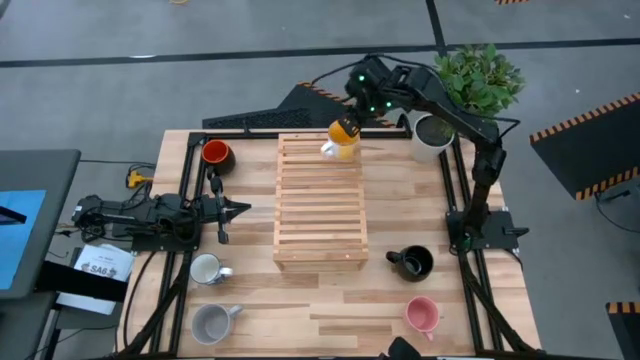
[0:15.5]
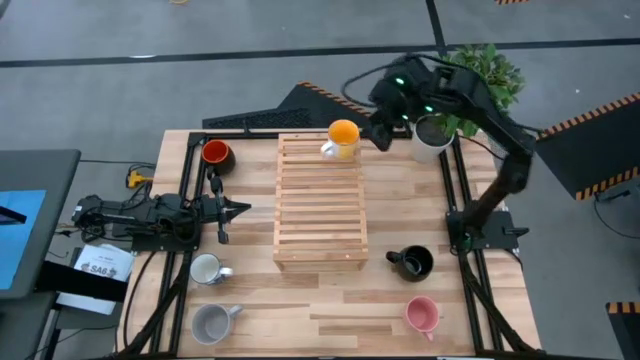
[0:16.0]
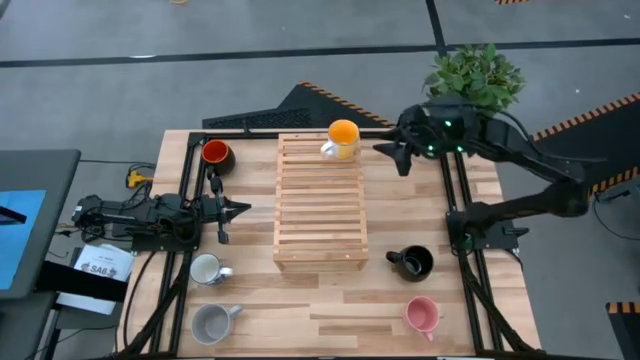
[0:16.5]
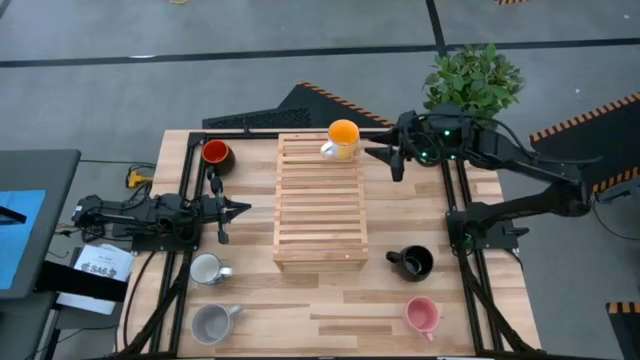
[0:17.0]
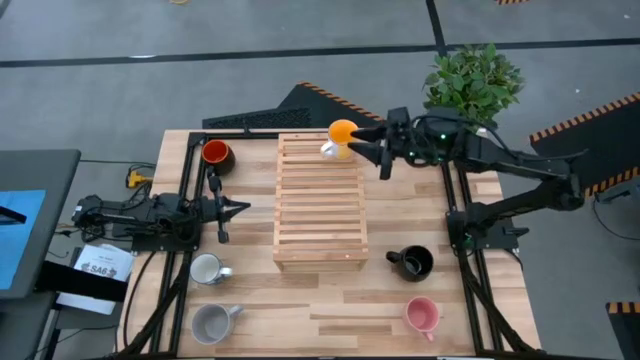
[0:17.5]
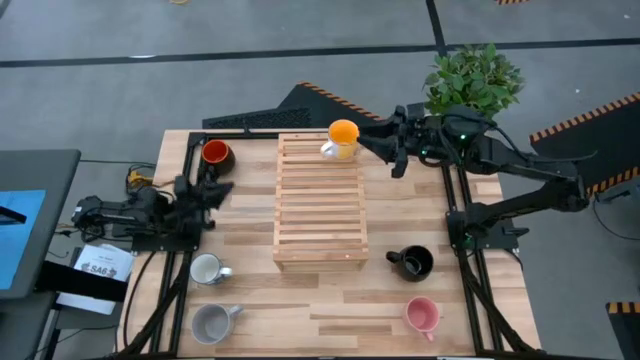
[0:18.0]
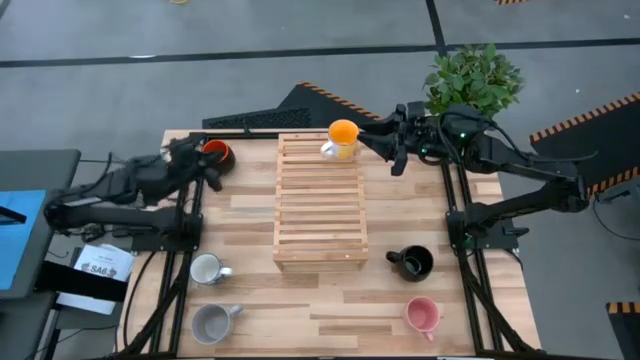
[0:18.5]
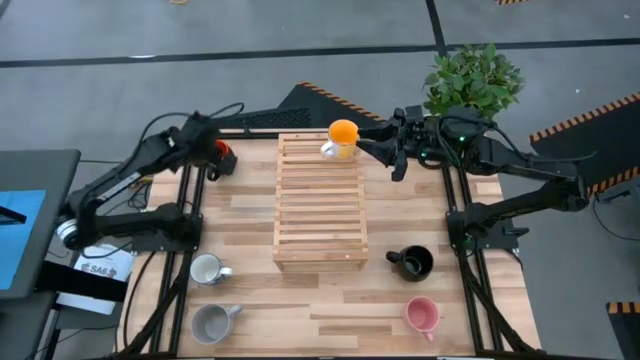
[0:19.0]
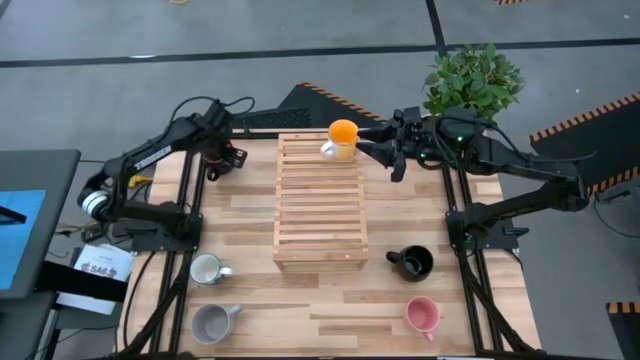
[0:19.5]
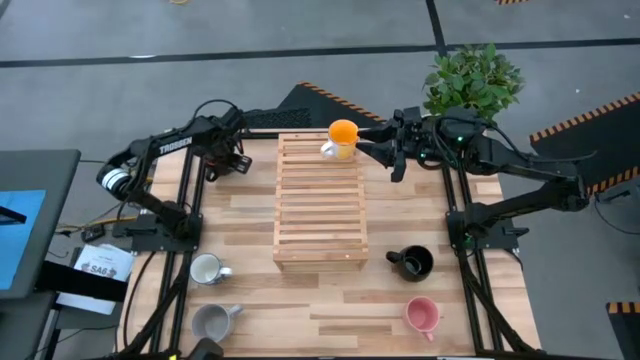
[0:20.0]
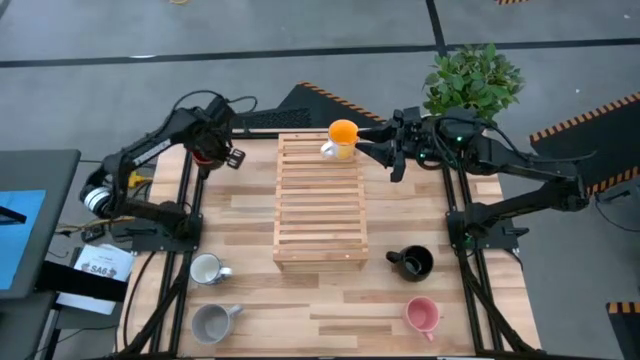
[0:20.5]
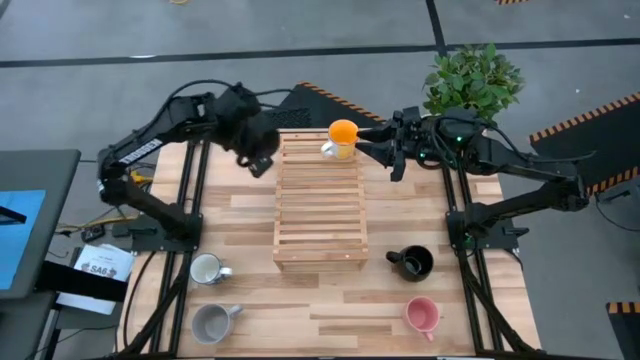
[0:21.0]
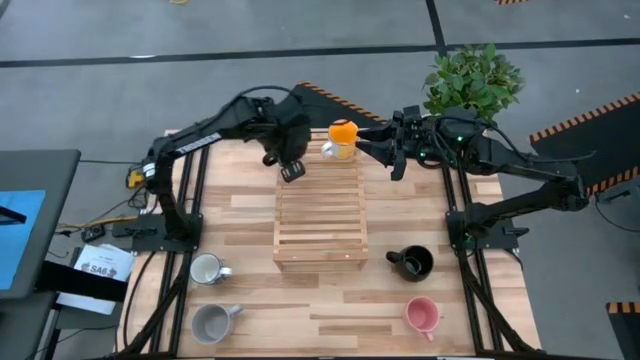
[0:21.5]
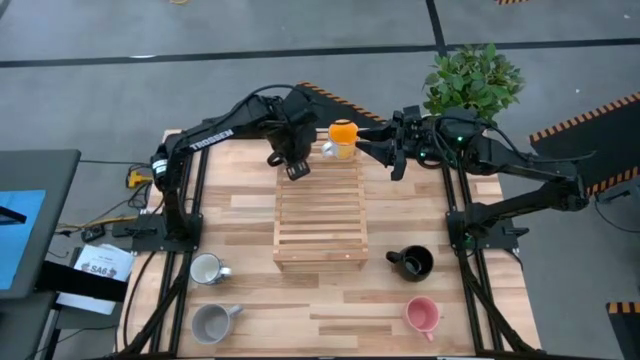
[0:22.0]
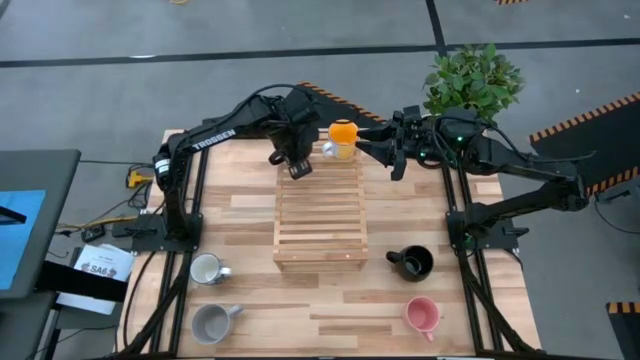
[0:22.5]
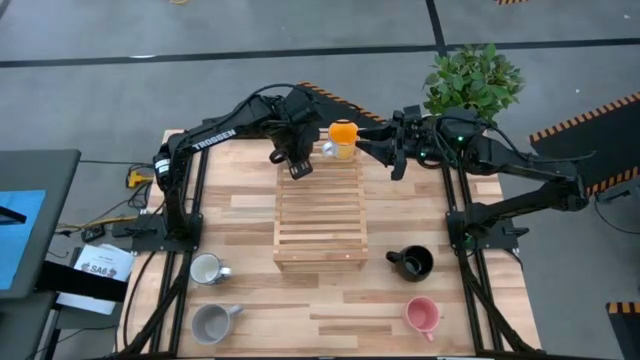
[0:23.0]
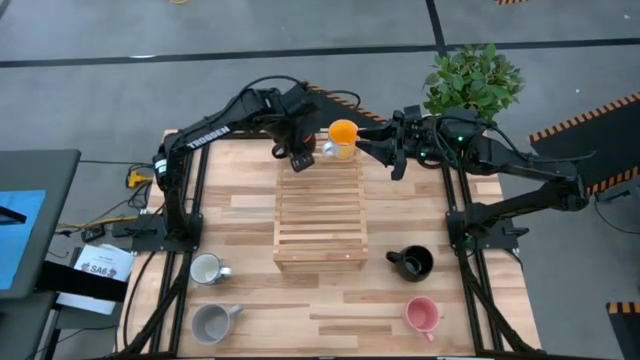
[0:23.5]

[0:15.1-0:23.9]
Task: Place coffee mugs
Put the orange mug on the shelf

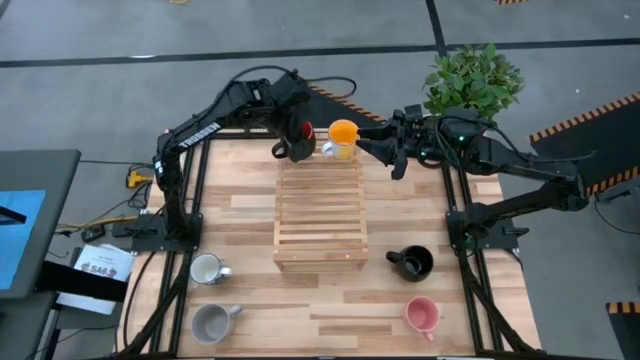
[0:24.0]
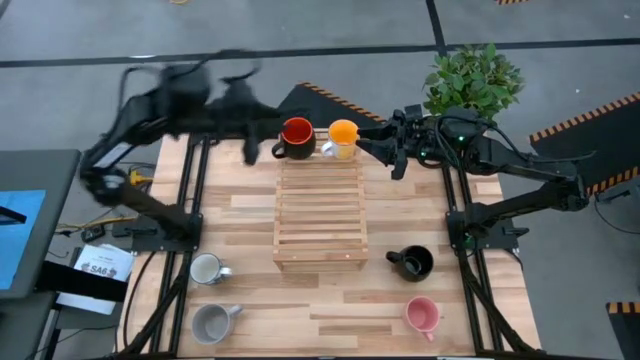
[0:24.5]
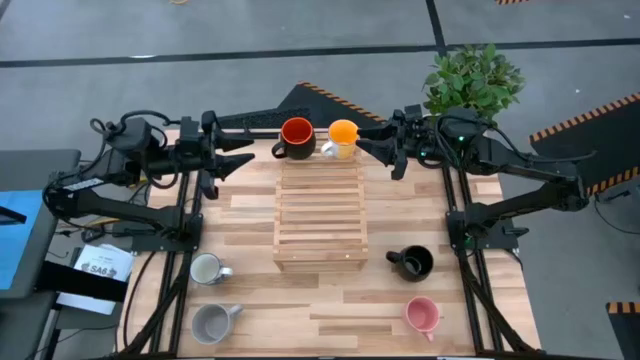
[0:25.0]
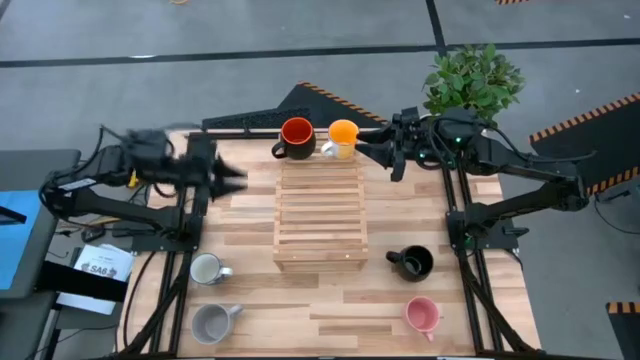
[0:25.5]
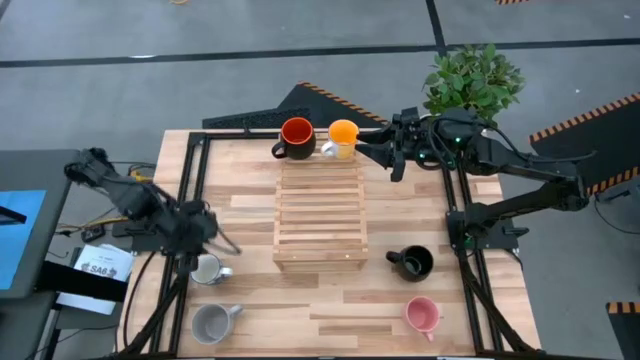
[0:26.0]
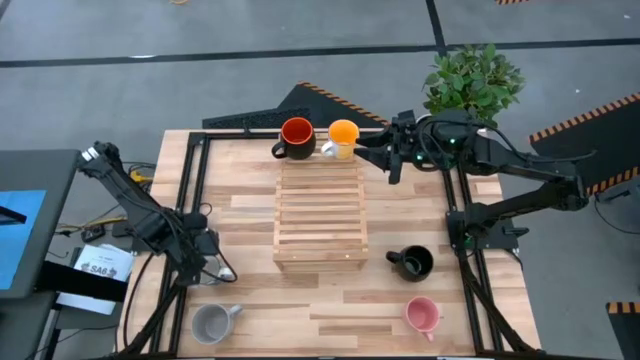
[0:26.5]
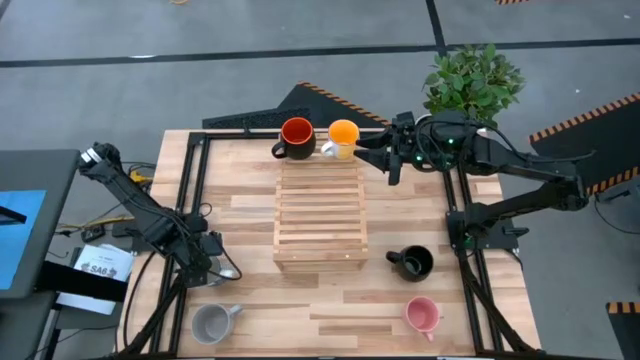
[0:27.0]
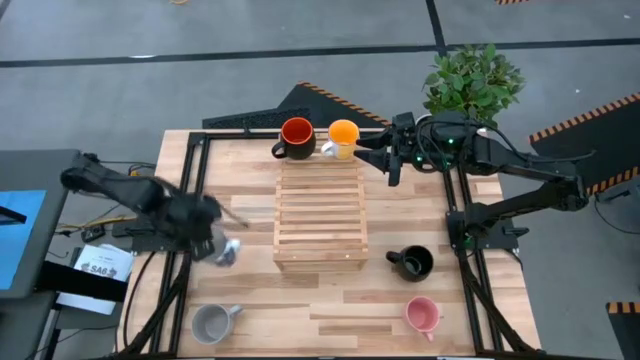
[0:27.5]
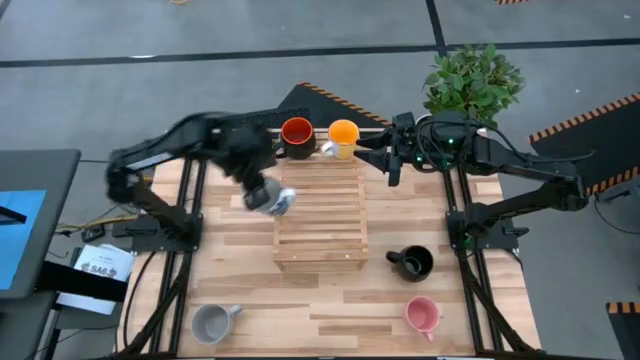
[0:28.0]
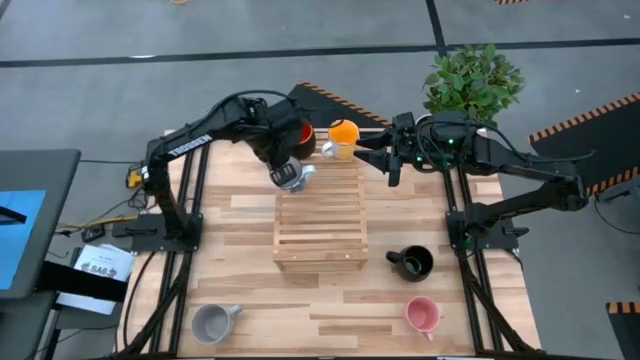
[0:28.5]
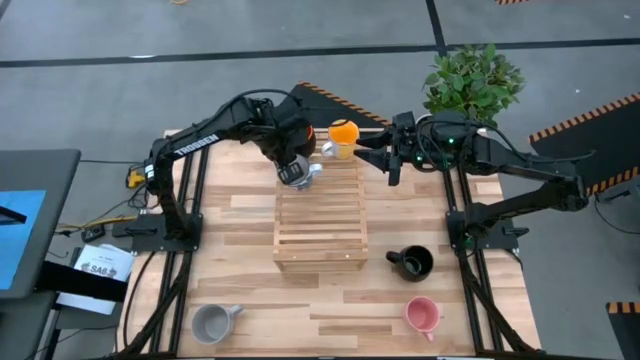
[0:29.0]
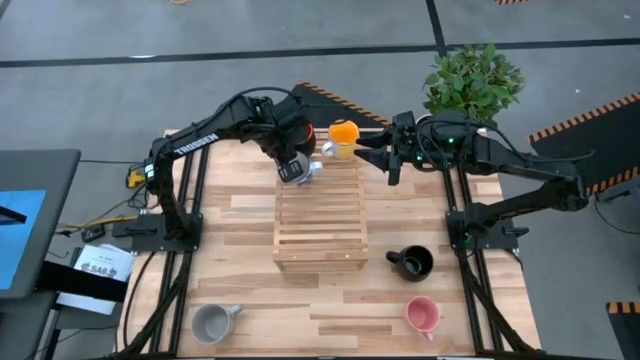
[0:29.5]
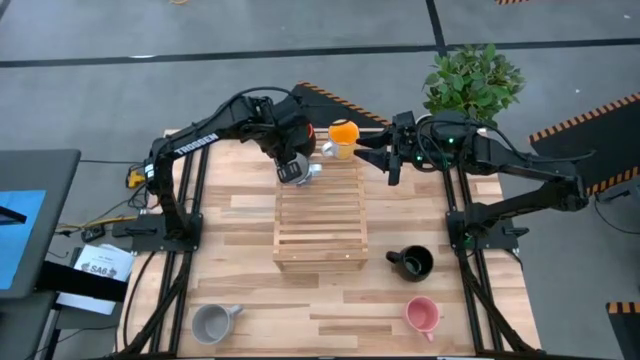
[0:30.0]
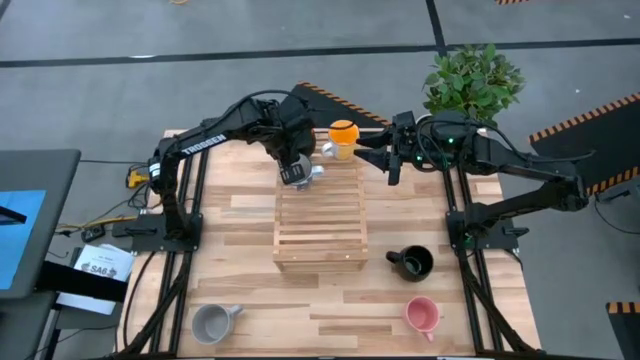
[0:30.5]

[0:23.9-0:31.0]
Put the white mug on the shelf

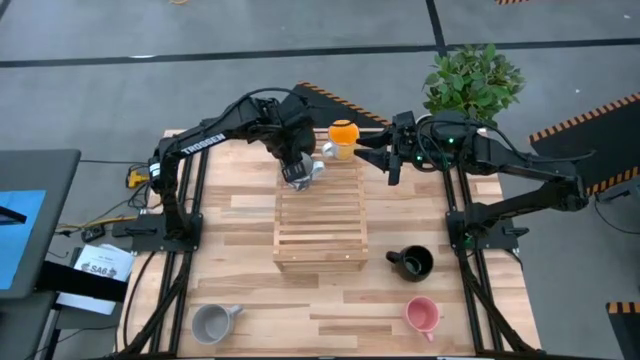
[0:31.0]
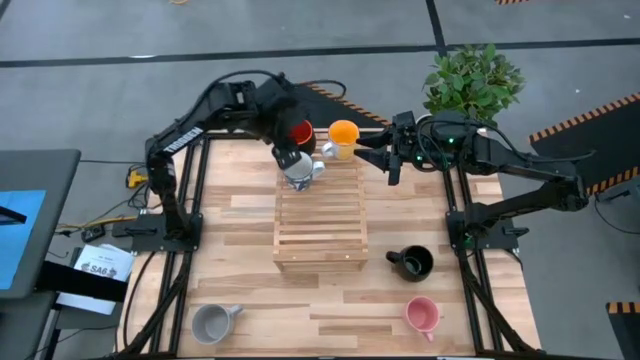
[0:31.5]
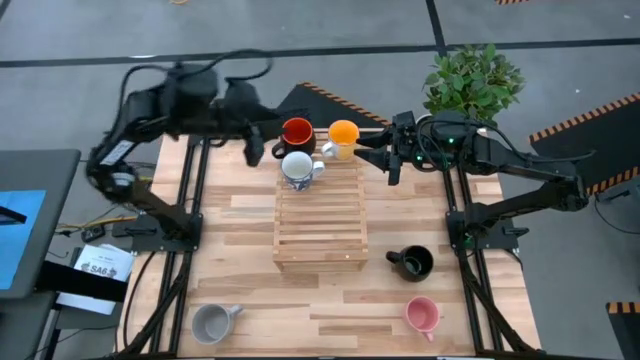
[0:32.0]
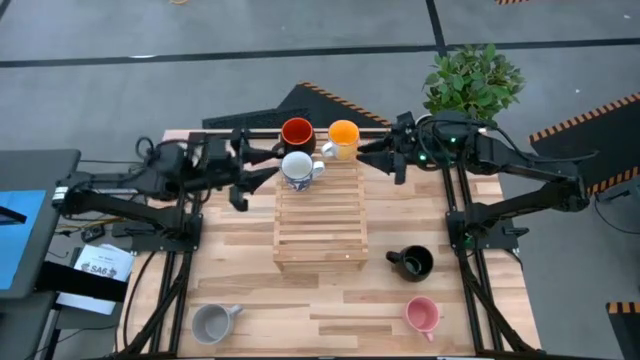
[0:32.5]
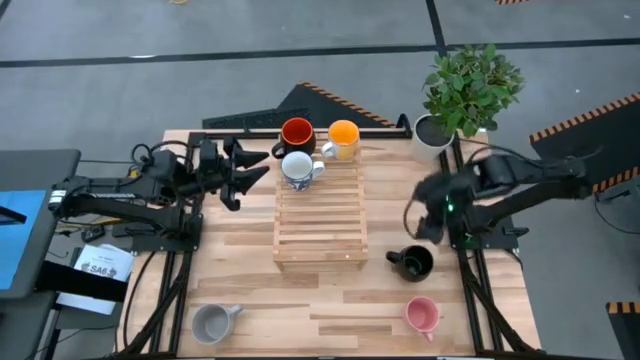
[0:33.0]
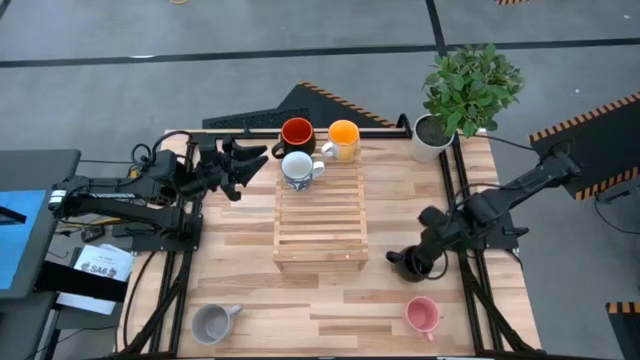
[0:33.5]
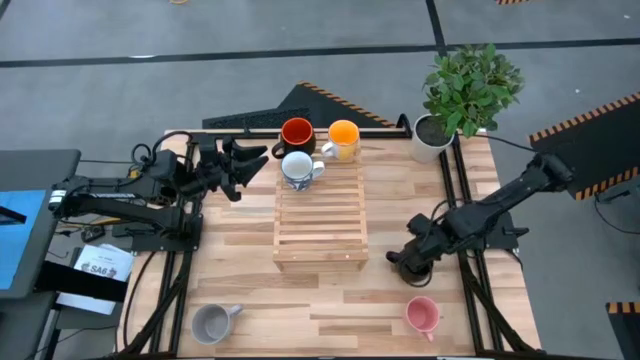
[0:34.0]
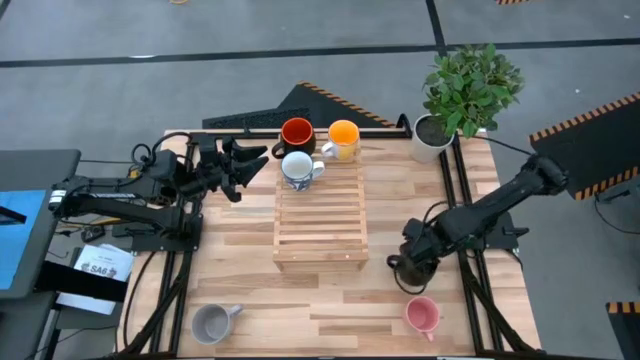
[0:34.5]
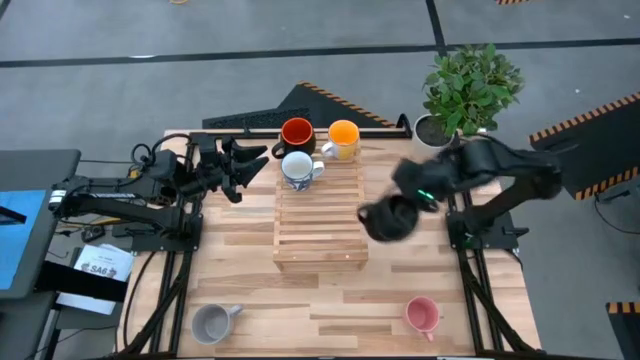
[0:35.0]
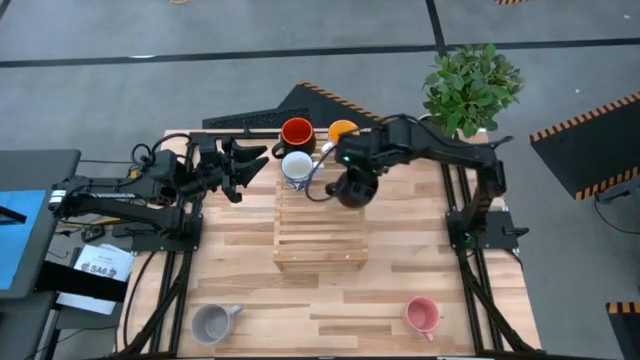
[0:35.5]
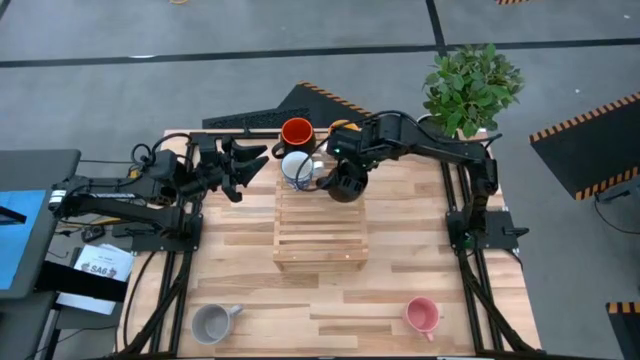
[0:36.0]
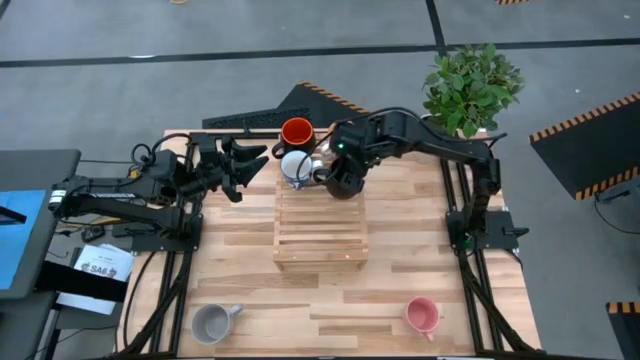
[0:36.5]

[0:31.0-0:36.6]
Put the black mug on the shelf
